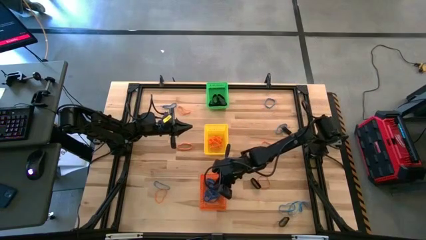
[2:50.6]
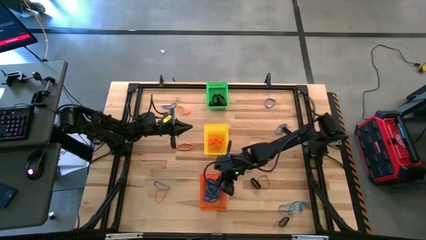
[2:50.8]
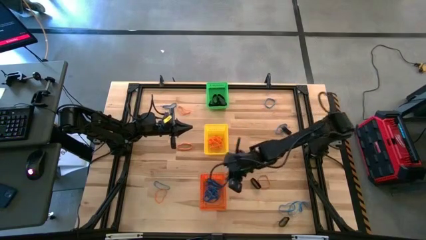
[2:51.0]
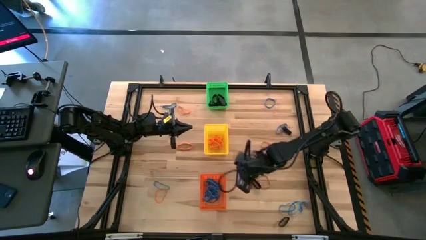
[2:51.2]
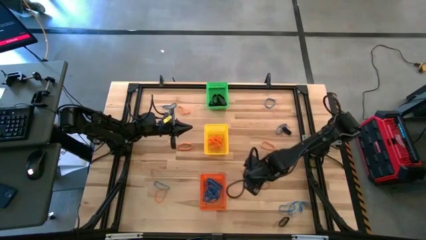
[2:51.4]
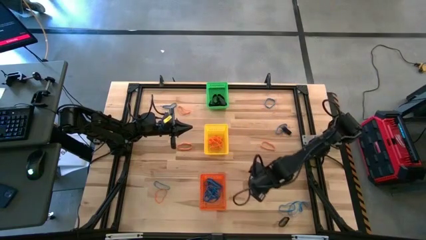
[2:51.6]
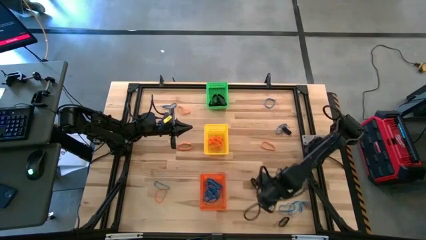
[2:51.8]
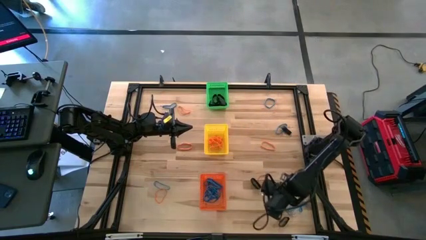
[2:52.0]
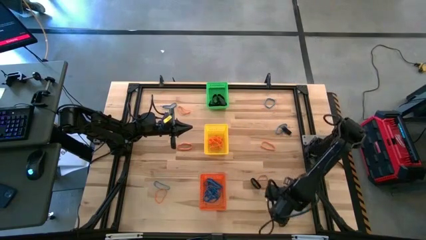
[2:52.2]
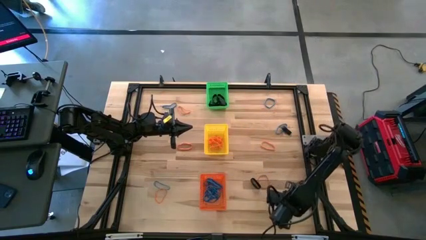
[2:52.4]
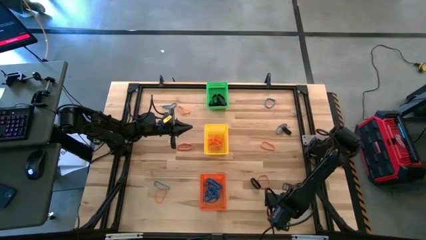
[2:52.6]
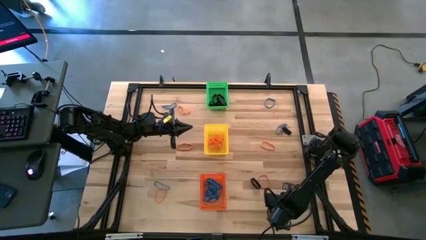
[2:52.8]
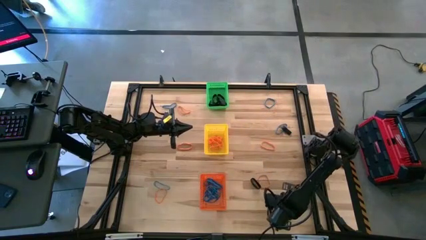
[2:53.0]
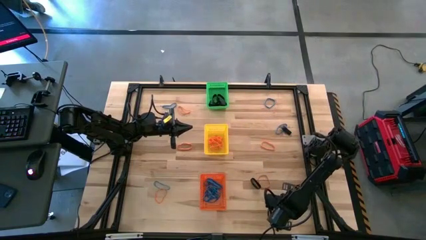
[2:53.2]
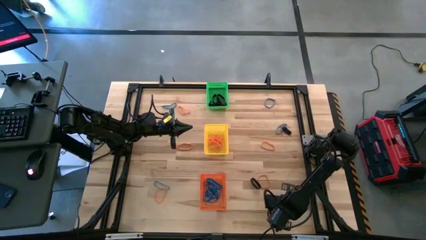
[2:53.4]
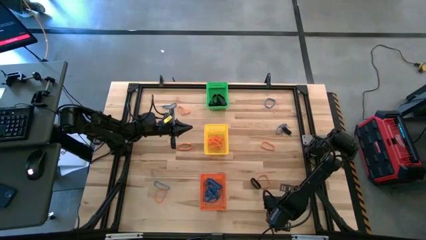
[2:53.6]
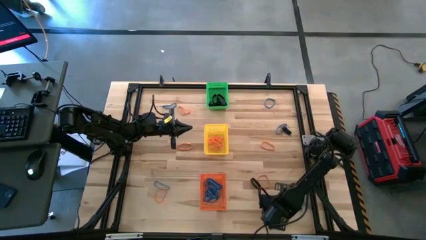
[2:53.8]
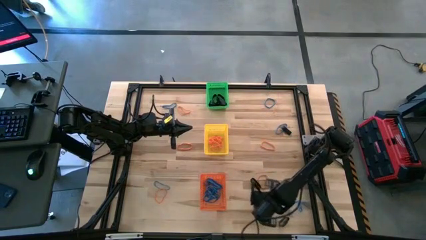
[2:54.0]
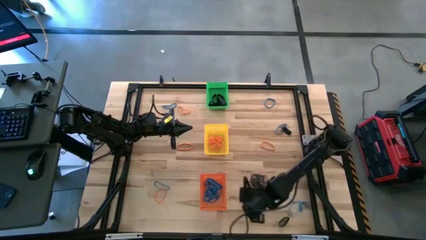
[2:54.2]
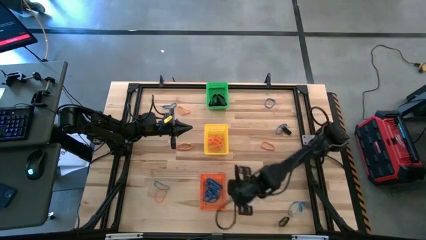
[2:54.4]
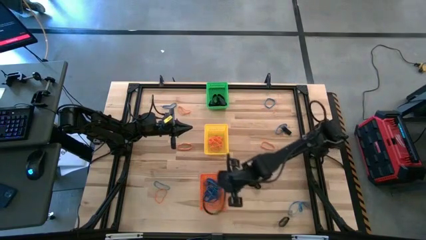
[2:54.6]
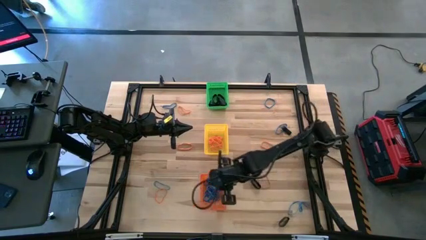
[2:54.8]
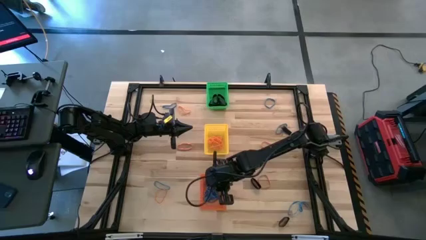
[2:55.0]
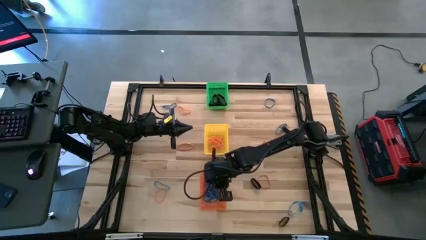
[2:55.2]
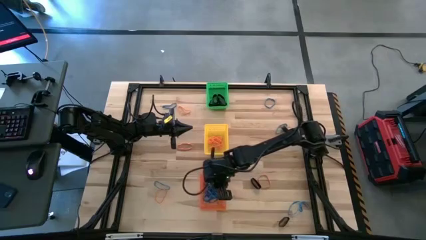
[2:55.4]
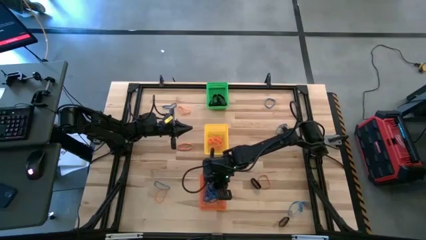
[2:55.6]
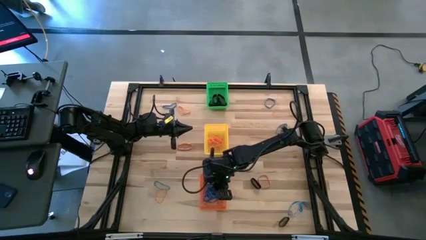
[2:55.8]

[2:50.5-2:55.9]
Task: Sort rubber bands into baskets
Put the blue rubber band into the orange bin

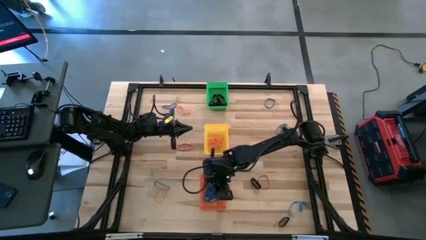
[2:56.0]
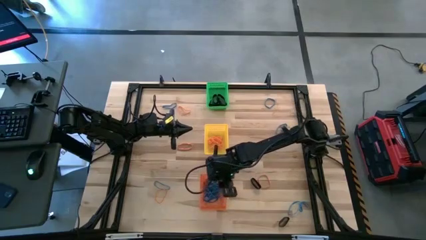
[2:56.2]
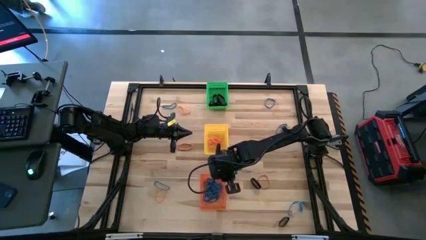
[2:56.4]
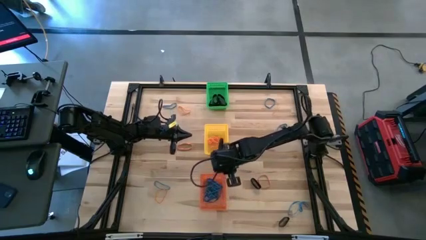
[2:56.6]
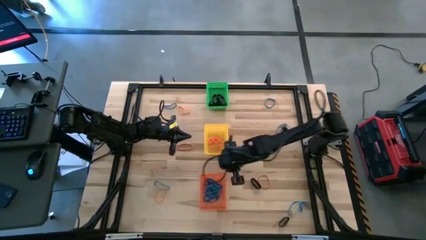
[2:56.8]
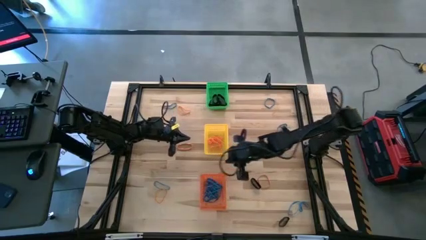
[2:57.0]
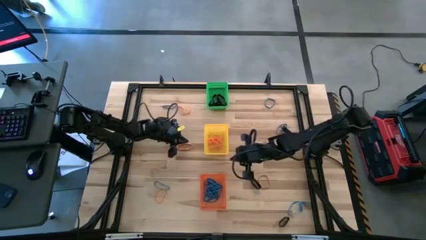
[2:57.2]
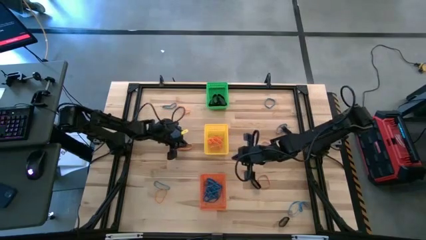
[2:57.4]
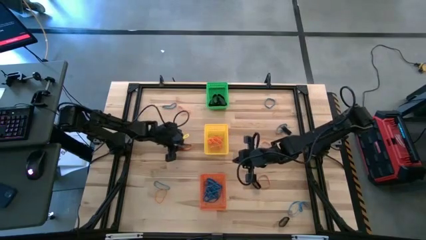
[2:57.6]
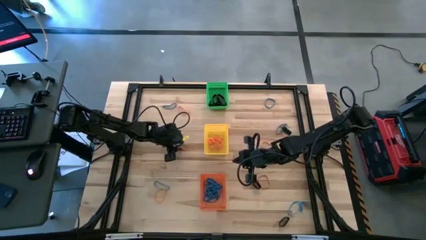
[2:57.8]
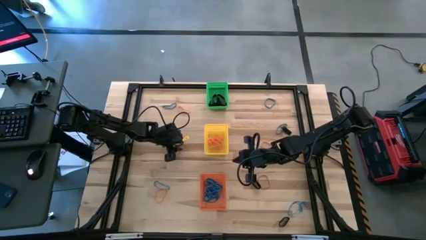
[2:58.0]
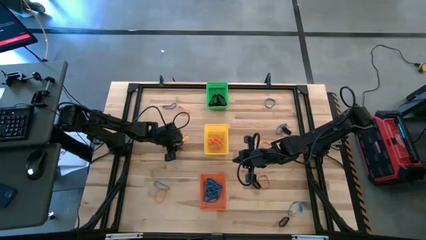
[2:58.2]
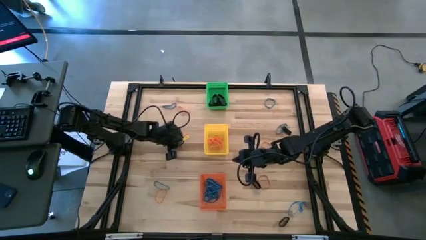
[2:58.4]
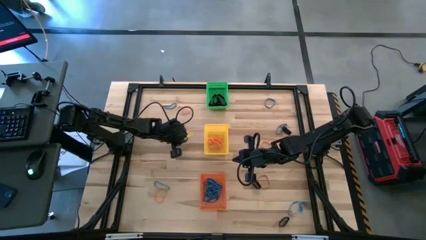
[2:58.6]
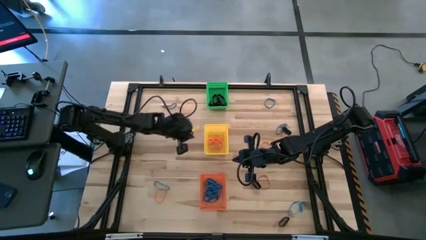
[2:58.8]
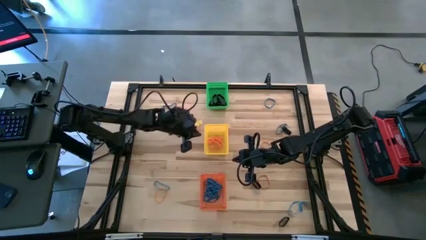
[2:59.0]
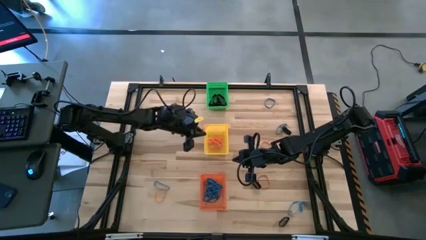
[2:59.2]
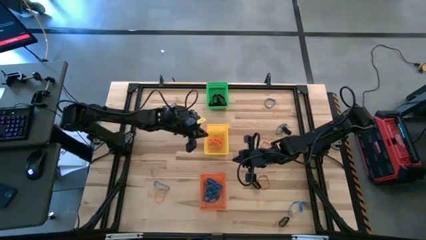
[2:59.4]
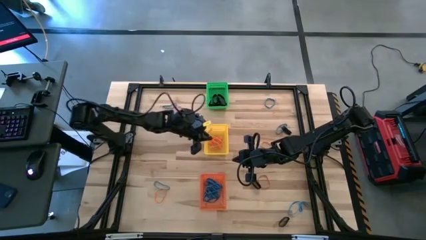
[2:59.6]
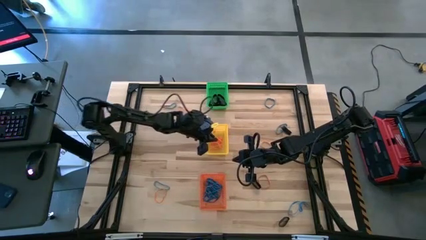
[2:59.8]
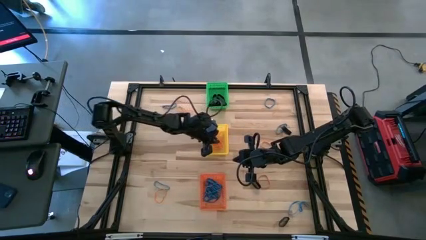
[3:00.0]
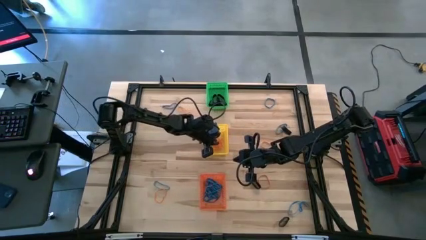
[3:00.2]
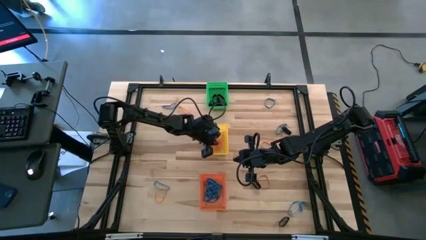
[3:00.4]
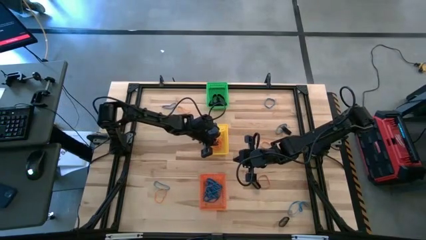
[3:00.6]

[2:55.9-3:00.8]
Put the orange rubber band into the yellow bin

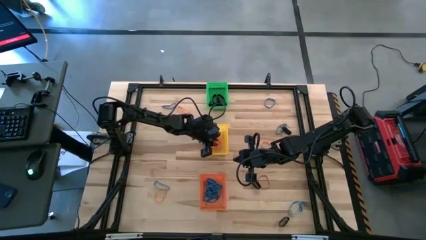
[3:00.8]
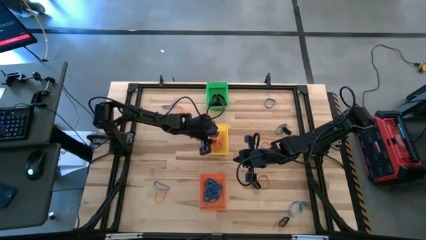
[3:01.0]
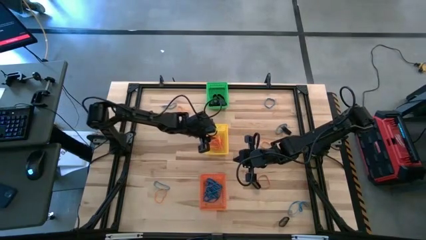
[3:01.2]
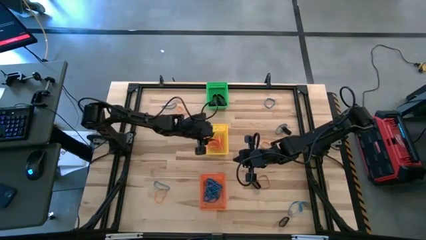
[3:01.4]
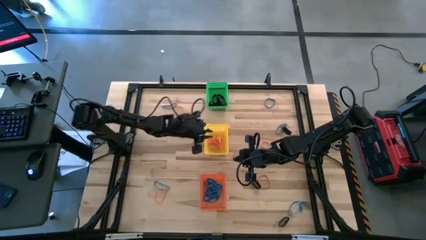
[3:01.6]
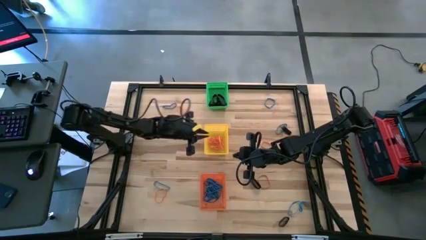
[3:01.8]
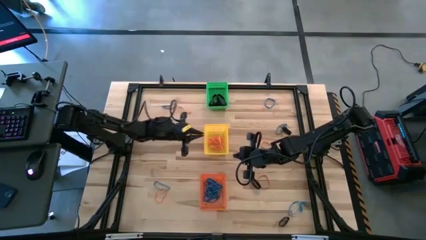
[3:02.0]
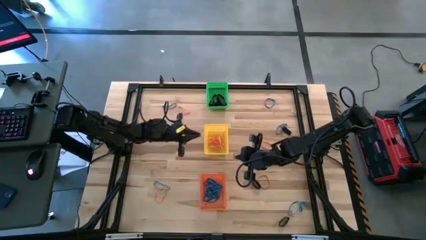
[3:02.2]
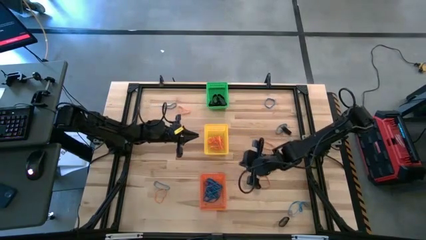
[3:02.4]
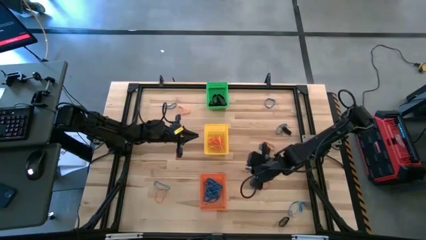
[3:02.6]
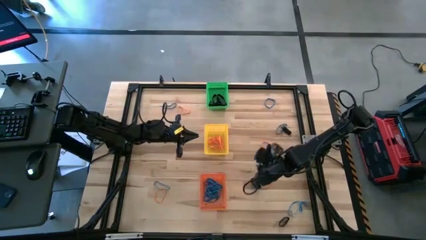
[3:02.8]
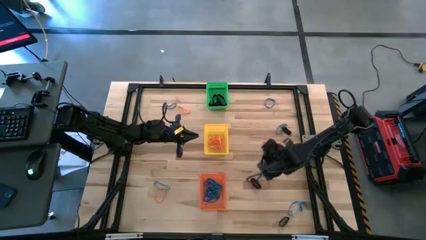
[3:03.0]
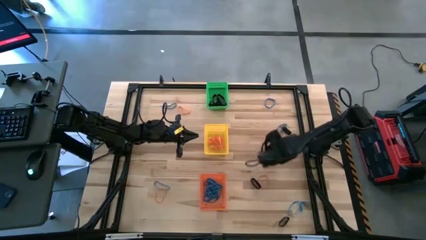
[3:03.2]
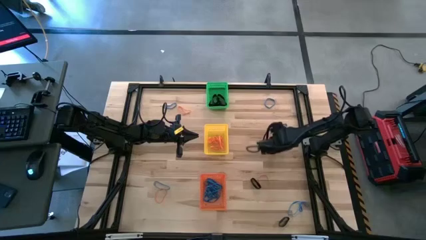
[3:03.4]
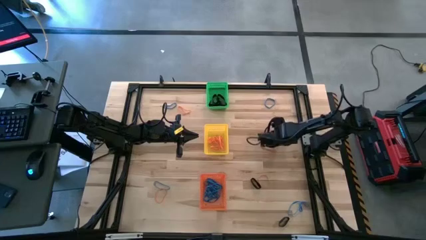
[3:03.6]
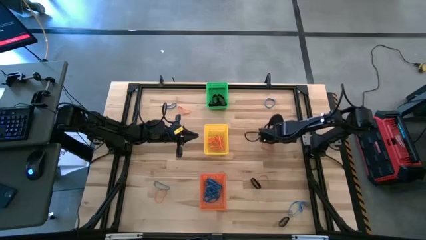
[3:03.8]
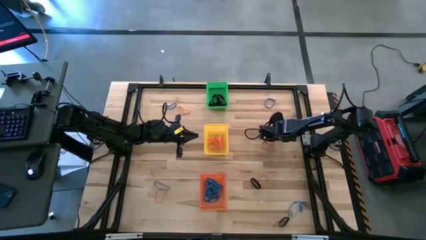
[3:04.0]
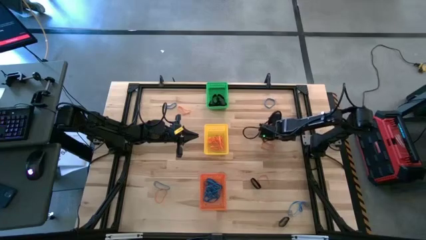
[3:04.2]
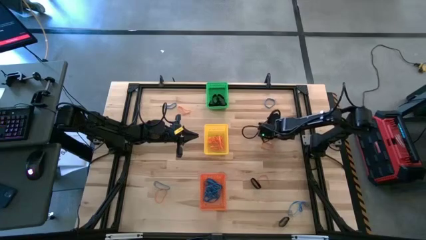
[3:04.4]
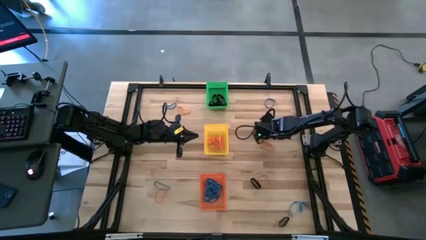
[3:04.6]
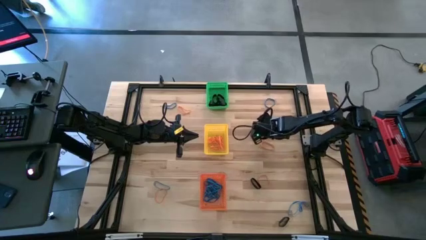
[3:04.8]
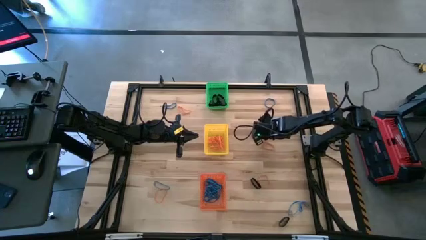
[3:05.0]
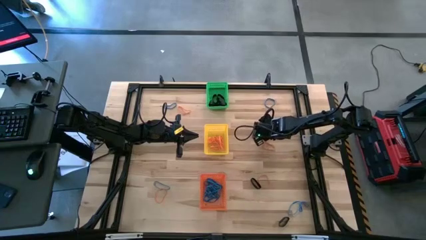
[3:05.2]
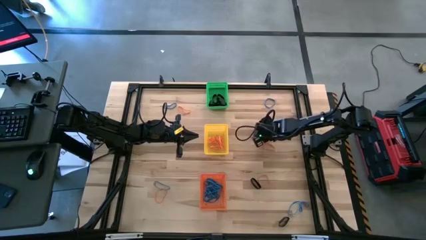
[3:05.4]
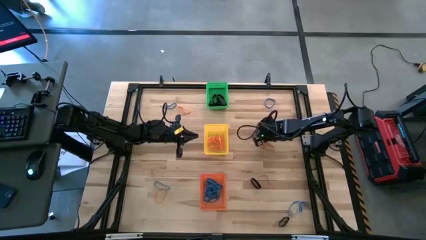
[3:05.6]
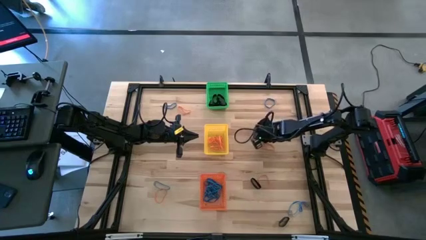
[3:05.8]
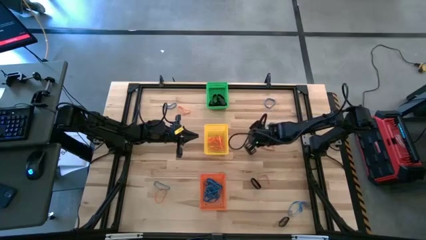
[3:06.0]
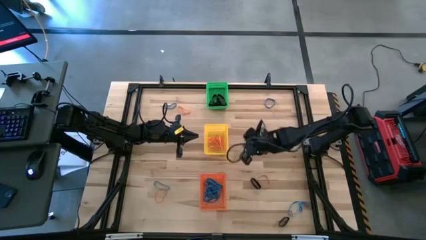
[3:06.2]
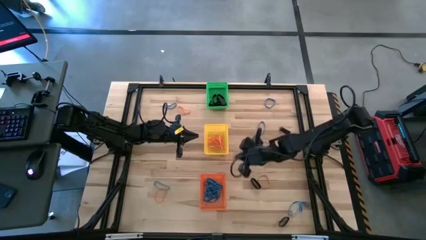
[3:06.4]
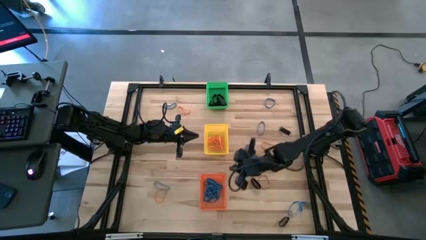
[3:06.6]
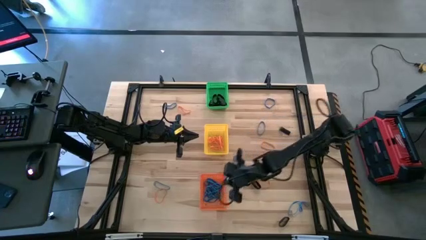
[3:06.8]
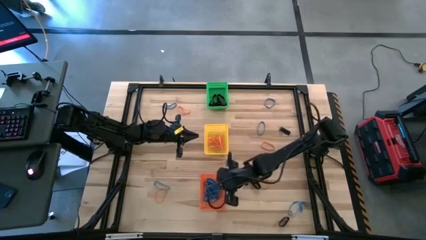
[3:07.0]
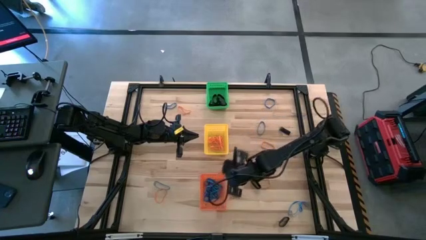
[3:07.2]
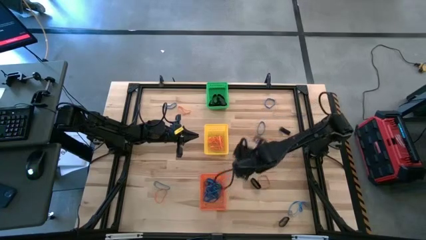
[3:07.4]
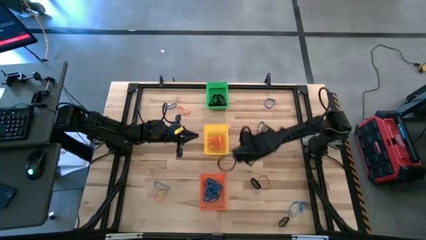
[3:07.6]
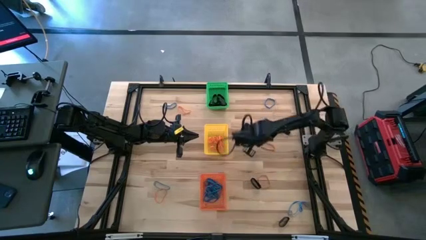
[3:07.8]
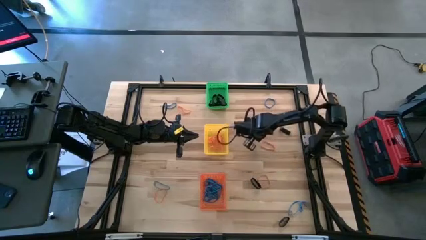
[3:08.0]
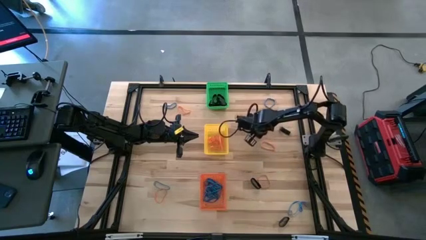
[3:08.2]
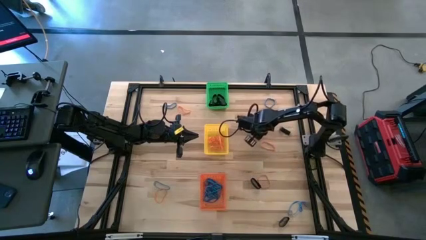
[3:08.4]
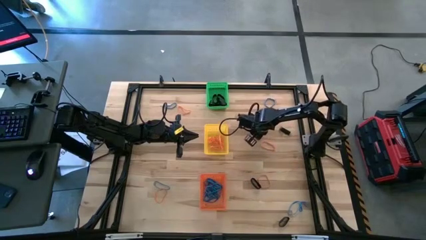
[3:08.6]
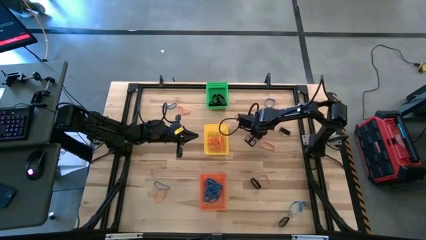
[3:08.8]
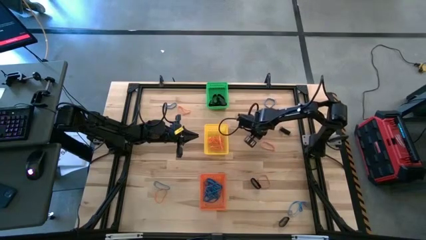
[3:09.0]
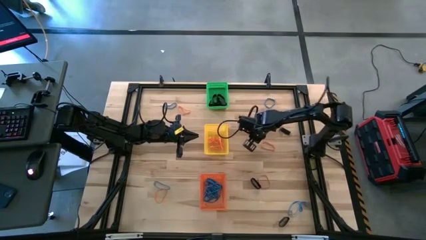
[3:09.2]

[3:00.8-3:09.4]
Put the blue rubber band into the orange bin
